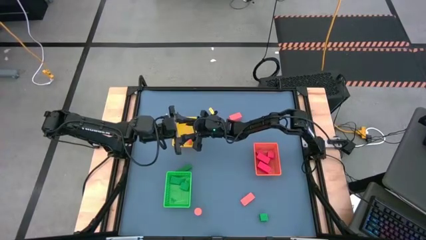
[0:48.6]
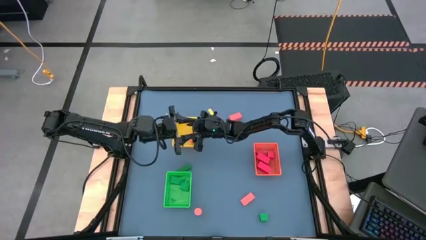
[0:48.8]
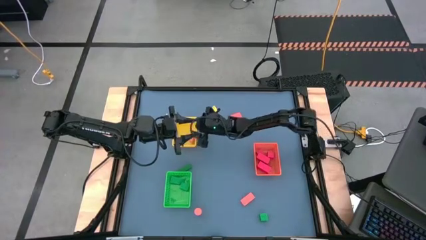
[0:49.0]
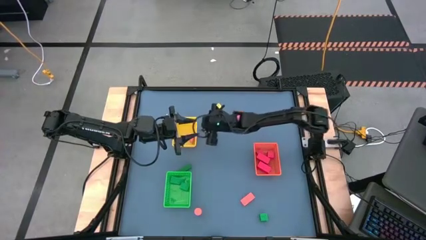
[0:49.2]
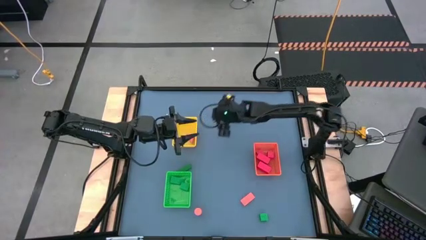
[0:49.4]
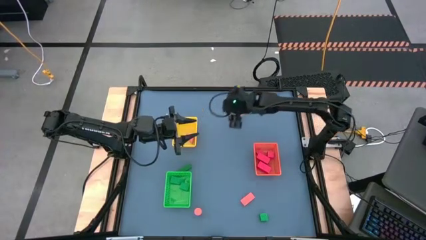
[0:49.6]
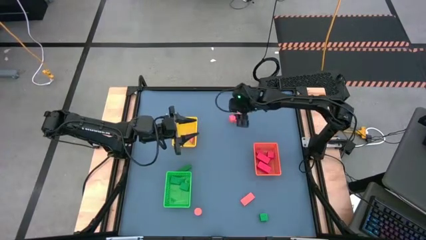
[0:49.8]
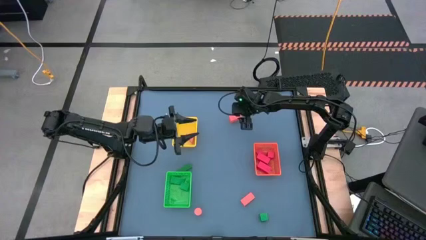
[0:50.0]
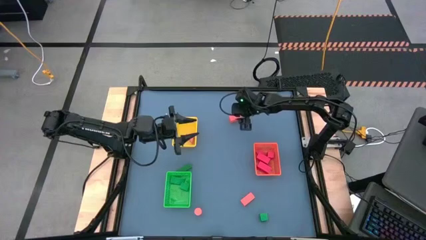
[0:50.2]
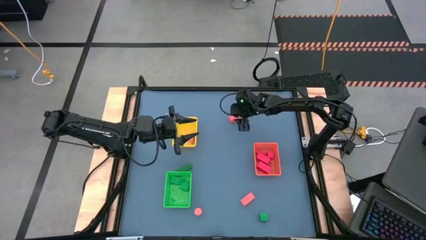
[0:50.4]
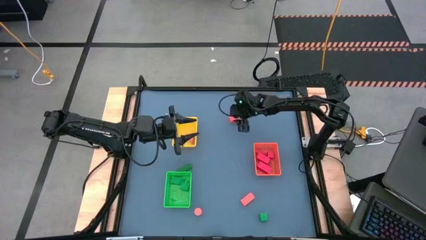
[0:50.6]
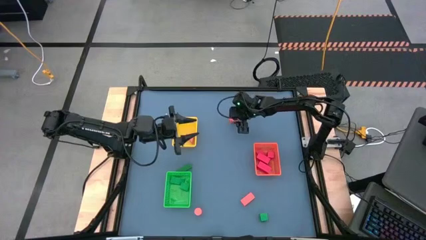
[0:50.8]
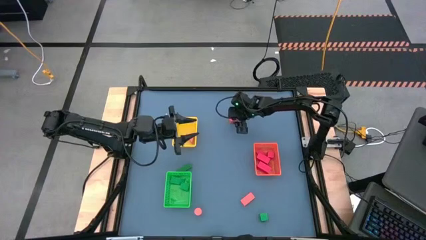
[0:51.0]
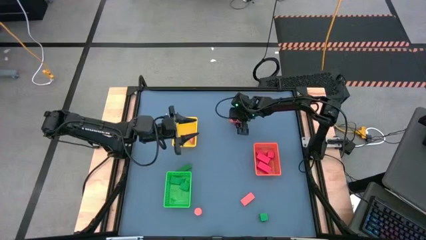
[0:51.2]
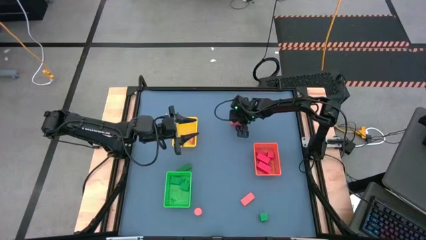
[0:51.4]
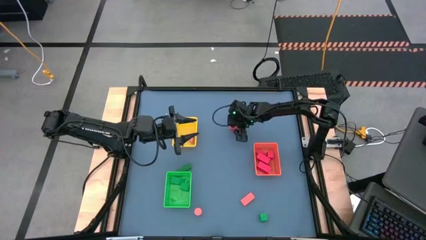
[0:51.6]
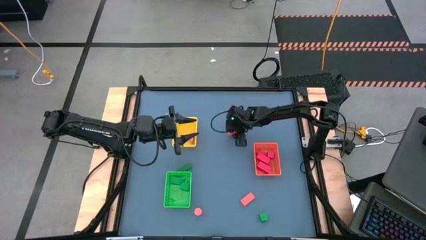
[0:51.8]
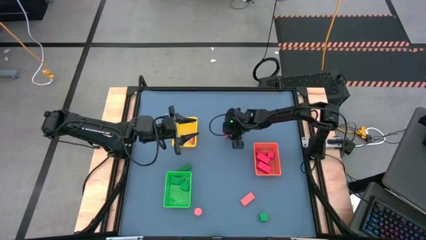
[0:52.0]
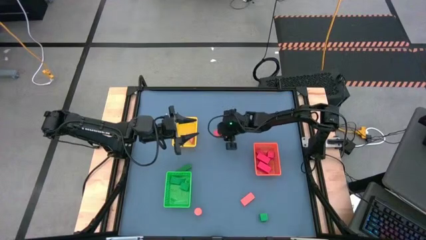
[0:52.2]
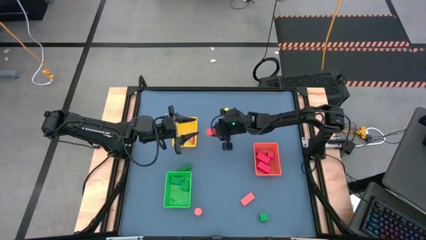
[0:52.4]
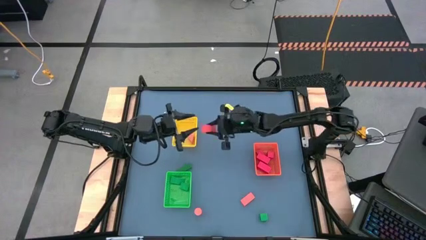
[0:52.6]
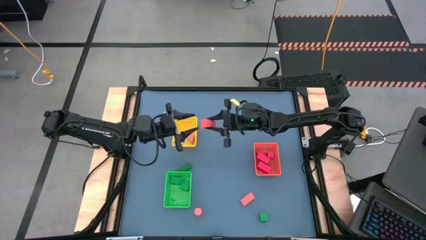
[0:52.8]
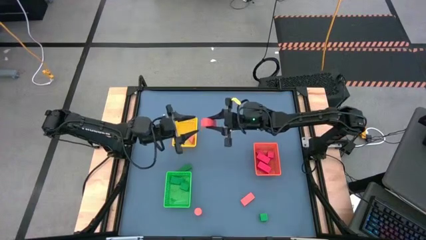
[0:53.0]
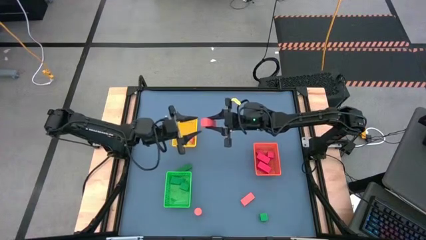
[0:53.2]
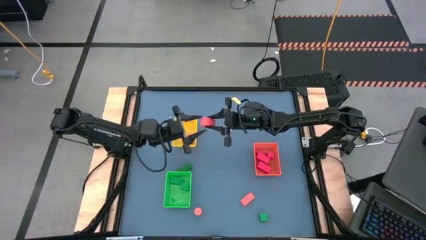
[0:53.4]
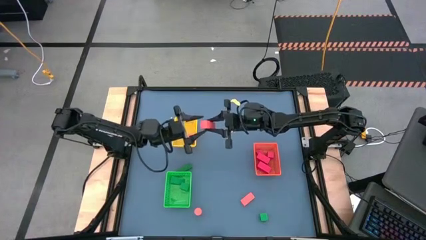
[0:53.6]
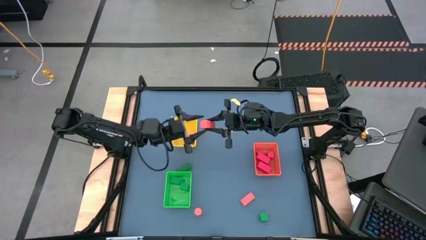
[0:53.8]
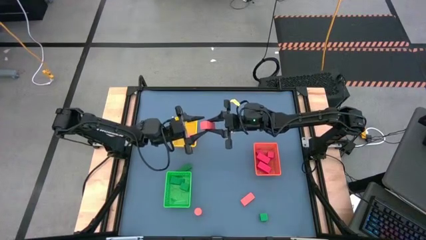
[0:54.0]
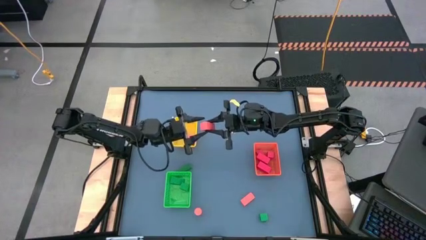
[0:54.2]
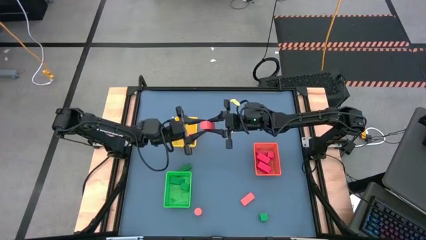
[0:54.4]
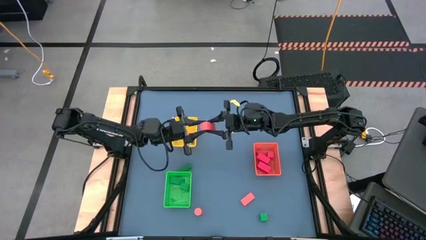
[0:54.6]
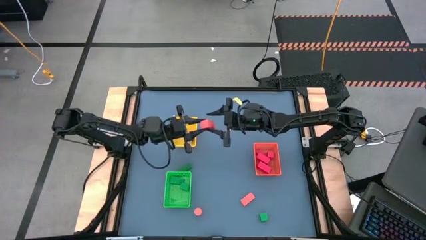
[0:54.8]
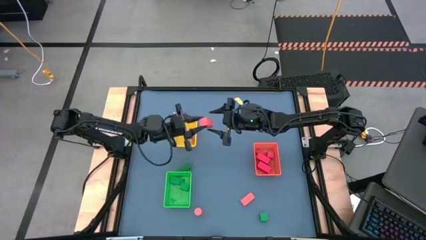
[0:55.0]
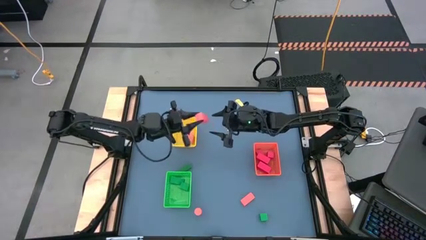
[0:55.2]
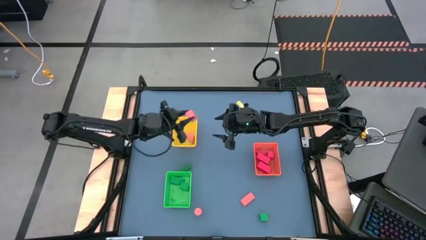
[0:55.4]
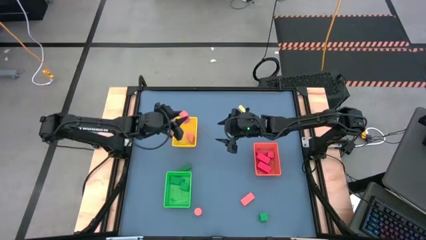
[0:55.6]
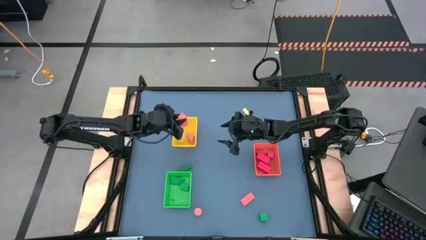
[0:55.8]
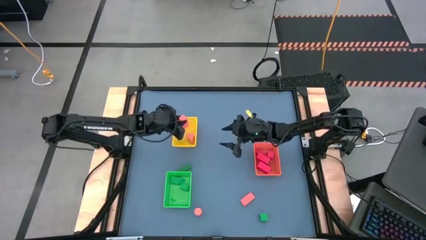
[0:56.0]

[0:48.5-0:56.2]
Task: Sort & place blocks by color
Put the orange block into the yellow bin

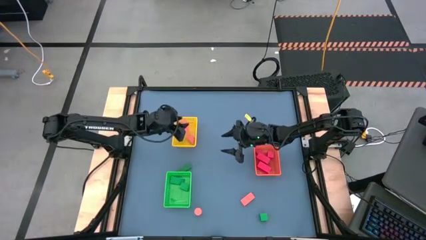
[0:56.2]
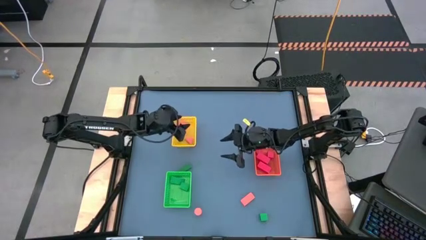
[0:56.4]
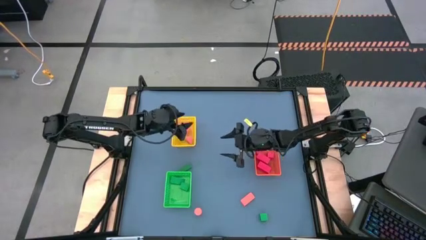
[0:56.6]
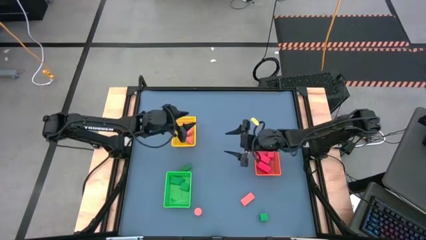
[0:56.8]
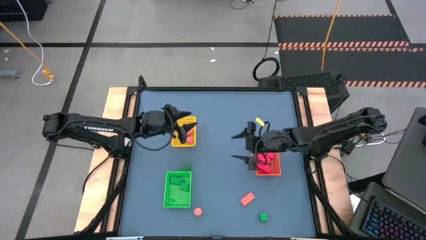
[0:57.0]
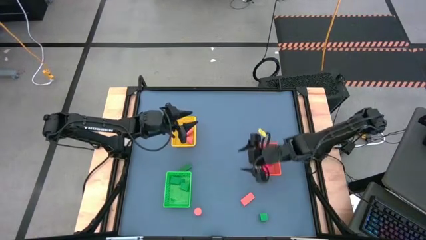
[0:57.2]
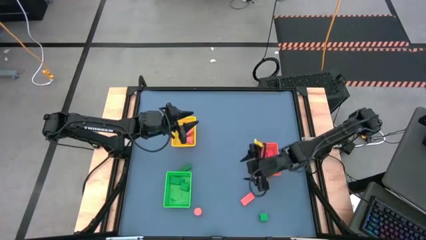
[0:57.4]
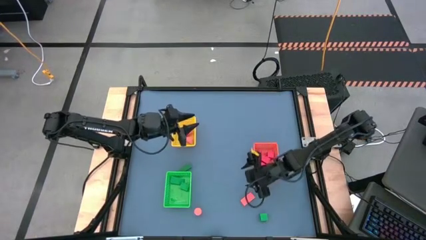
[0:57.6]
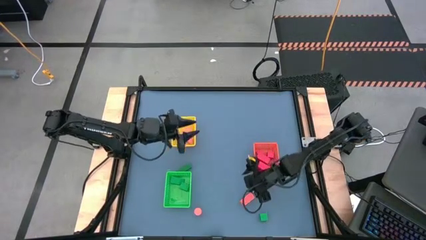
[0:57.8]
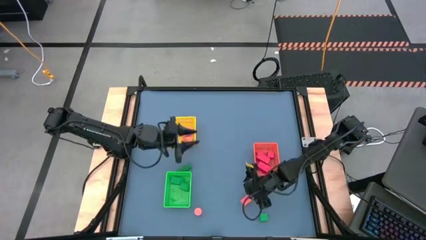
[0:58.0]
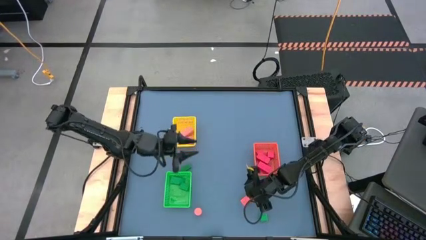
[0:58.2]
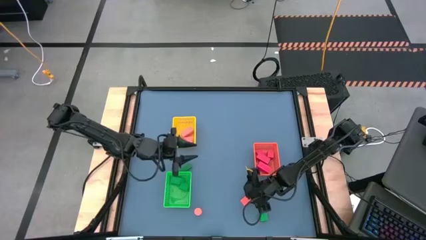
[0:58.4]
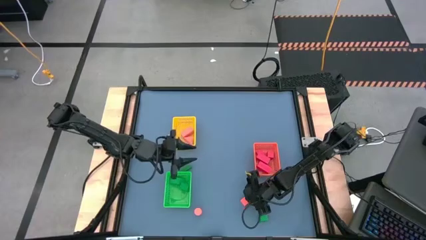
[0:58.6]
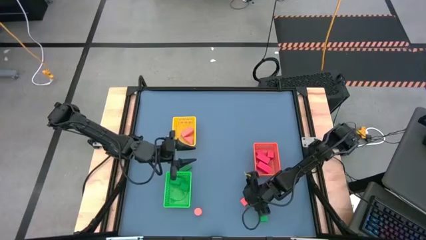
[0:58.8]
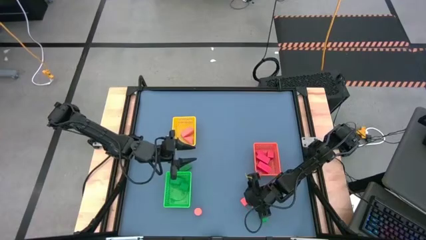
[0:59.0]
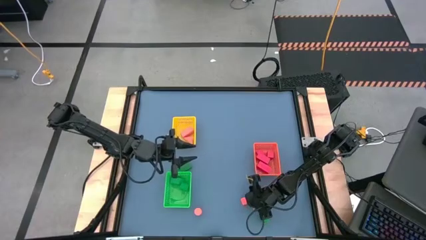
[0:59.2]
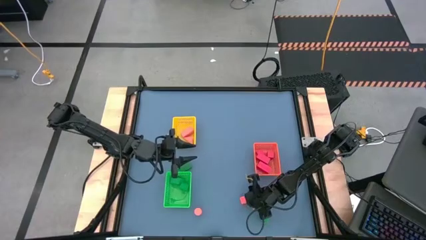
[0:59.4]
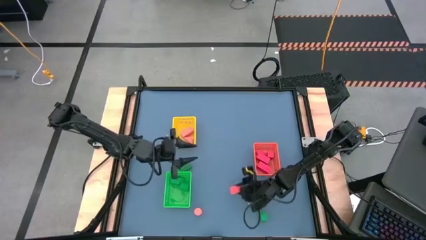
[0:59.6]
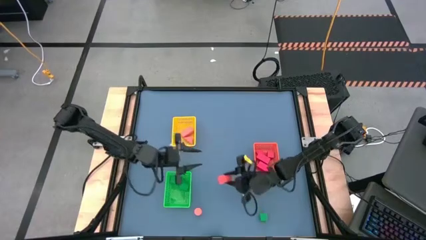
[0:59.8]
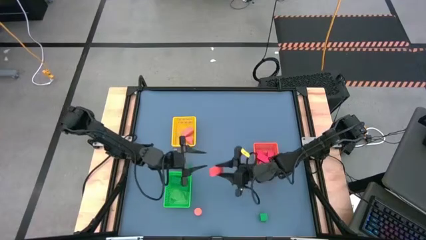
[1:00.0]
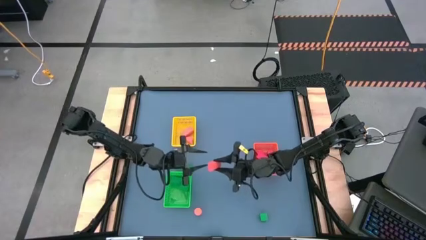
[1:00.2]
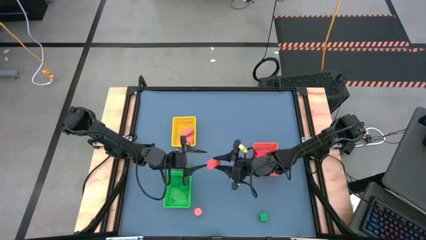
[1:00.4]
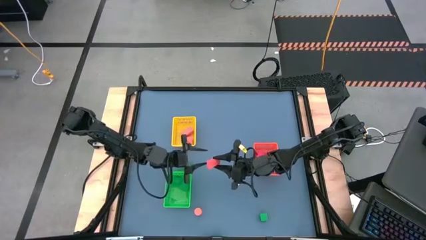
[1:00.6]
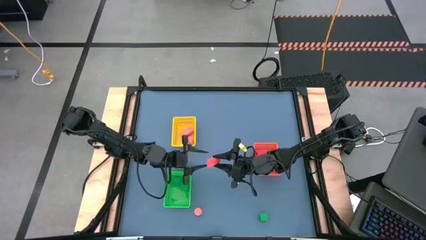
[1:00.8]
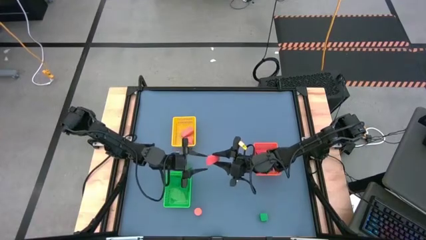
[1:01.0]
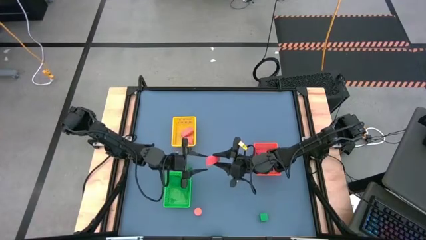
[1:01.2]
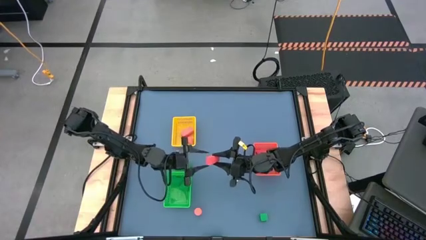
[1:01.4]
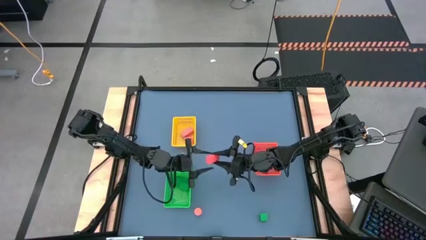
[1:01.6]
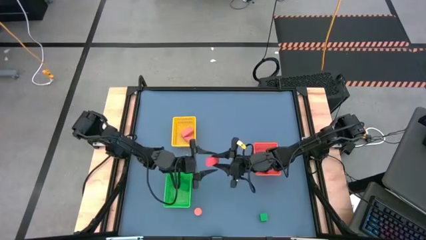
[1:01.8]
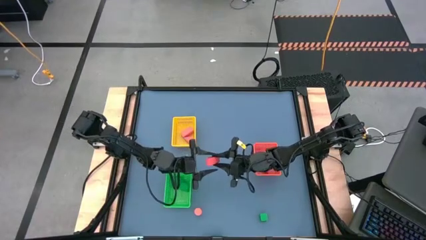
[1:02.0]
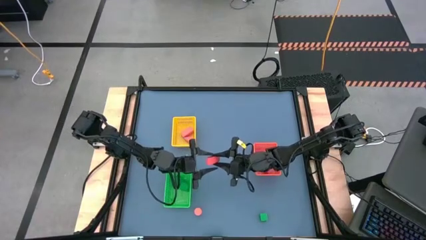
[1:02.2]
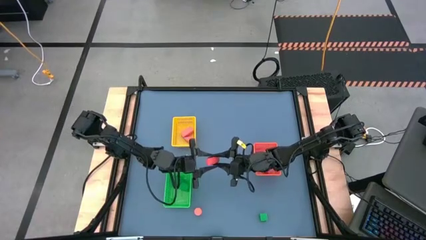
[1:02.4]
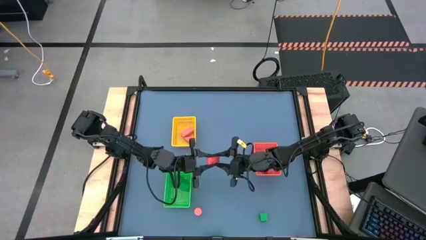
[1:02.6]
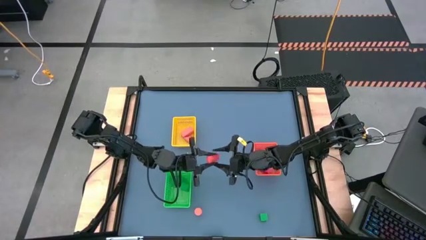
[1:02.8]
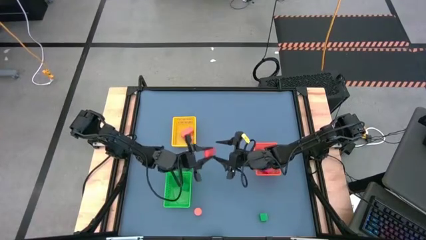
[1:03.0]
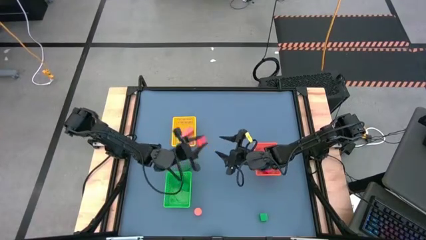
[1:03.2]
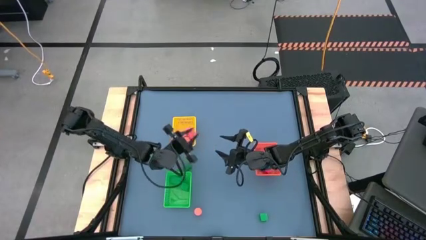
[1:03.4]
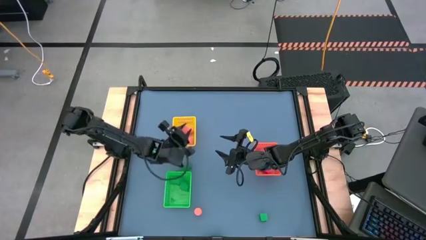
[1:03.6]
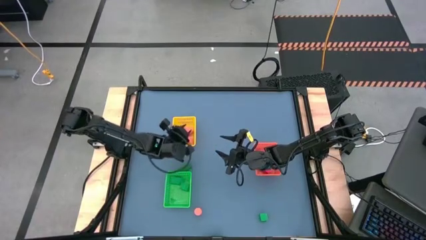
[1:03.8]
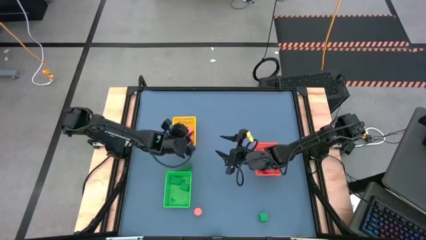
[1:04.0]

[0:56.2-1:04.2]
Put the orange block into the yellow bin

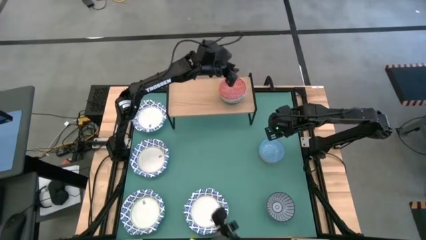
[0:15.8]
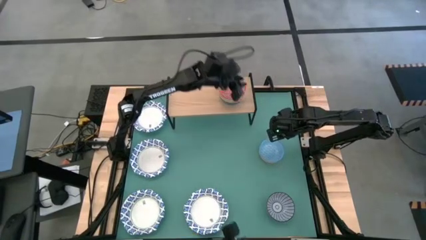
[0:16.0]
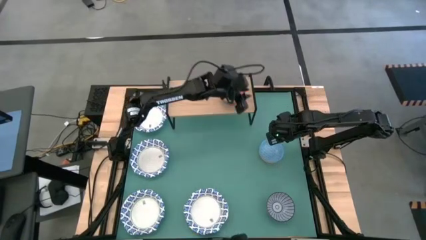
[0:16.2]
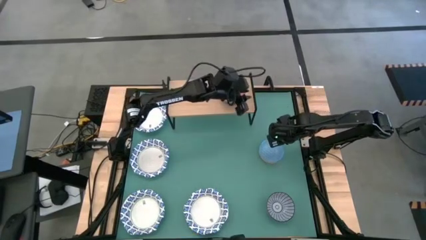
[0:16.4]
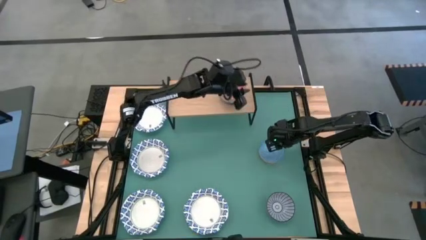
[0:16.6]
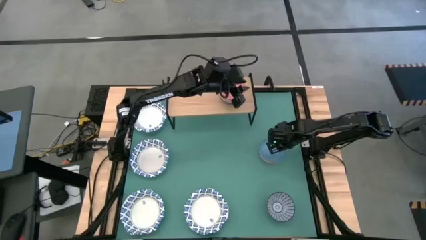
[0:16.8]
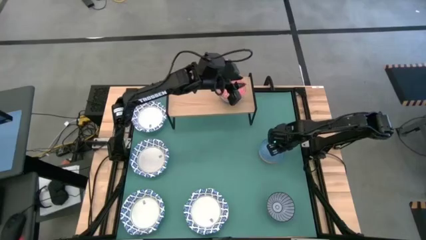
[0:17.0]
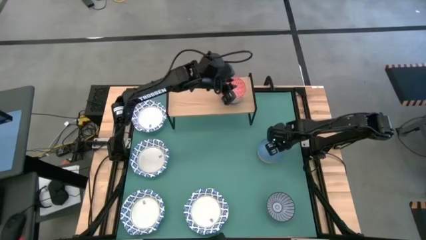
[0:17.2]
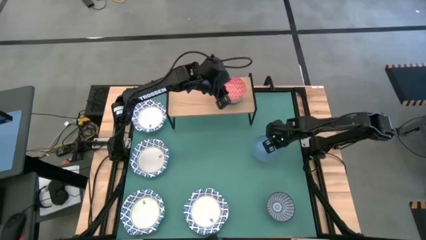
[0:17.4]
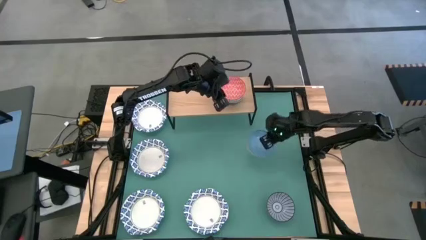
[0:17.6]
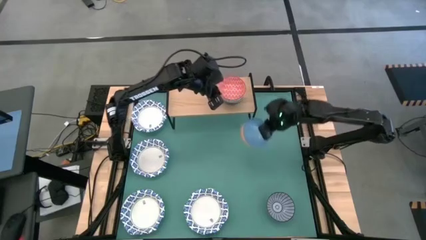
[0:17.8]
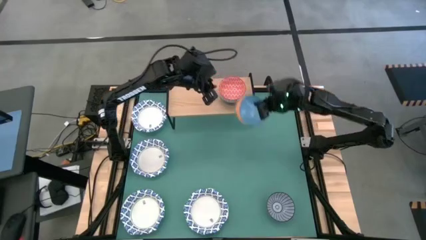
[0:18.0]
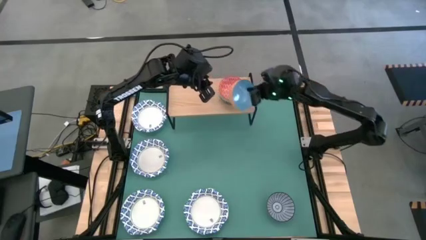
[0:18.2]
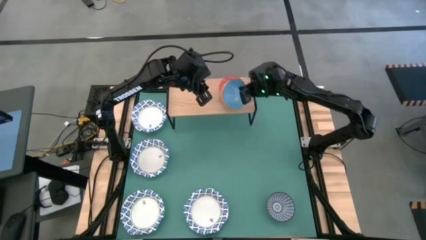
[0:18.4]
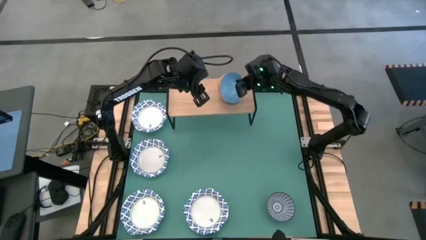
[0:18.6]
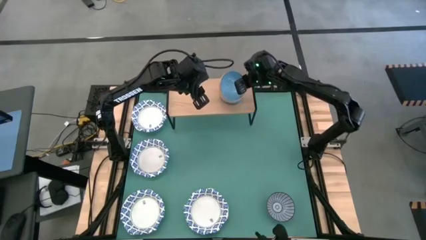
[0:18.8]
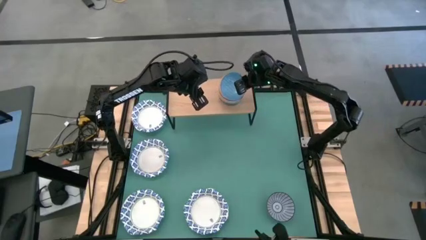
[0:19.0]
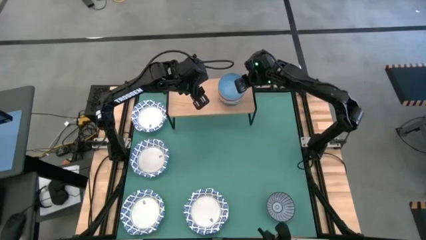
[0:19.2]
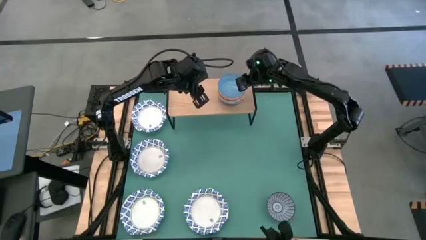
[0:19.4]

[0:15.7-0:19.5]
Task: Place and stack bowls onto a shelf
Stack the small blue bowl on the small red bowl on the shelf
